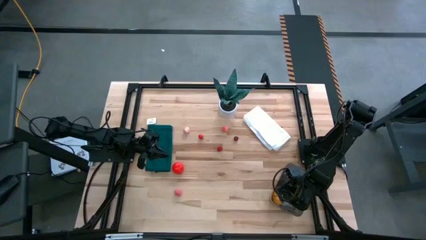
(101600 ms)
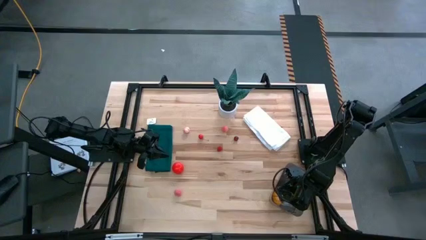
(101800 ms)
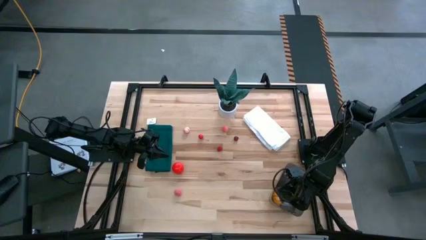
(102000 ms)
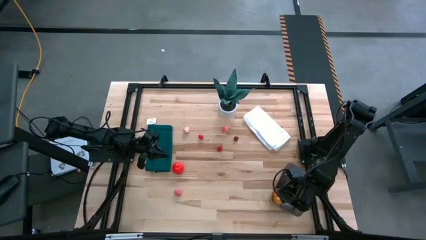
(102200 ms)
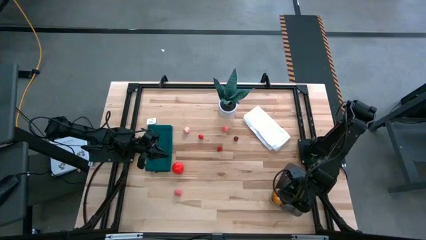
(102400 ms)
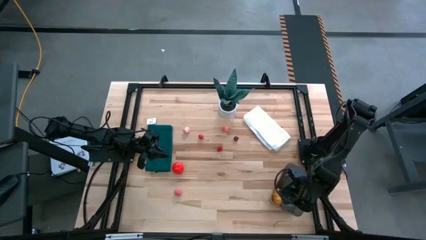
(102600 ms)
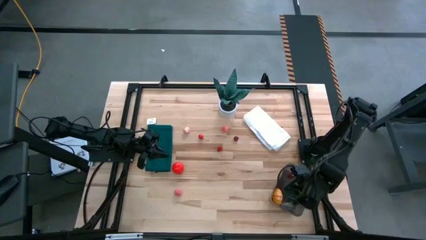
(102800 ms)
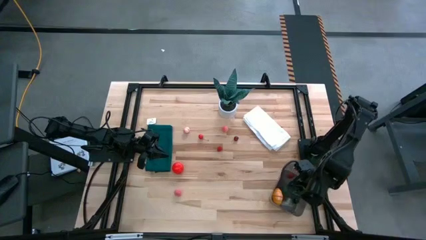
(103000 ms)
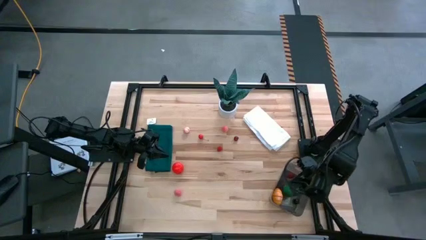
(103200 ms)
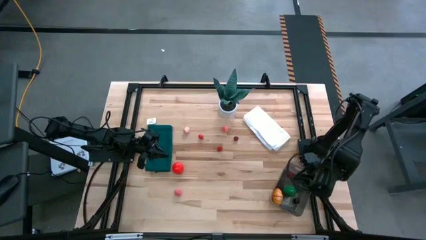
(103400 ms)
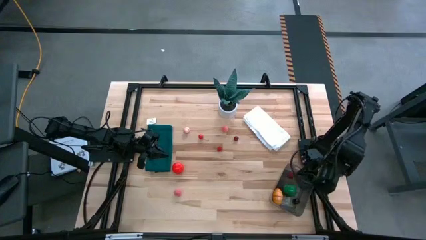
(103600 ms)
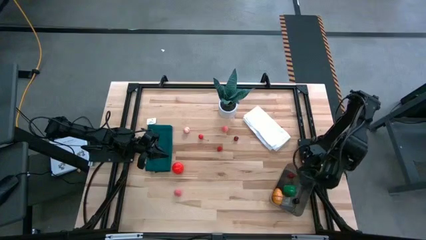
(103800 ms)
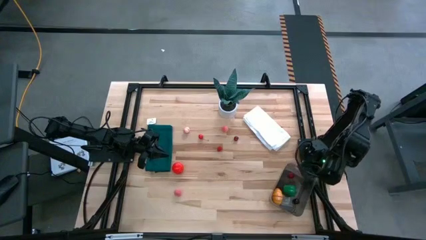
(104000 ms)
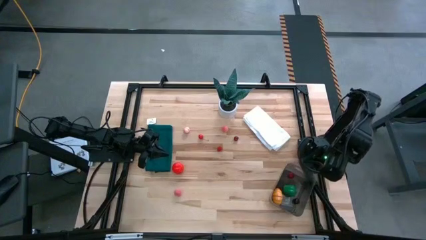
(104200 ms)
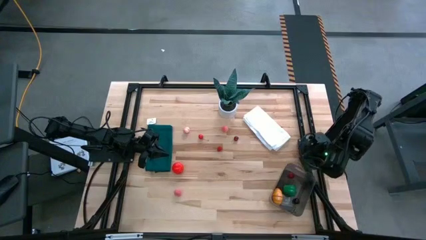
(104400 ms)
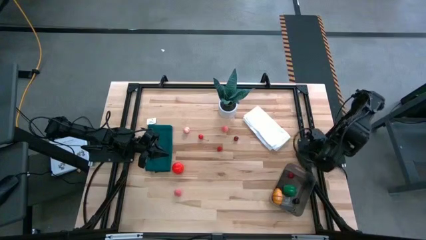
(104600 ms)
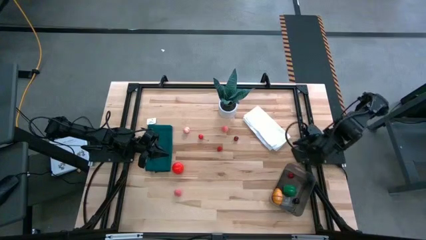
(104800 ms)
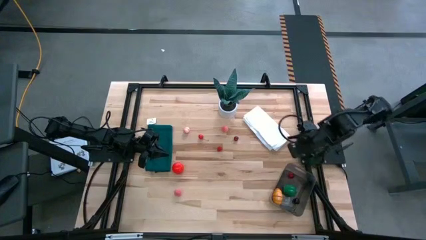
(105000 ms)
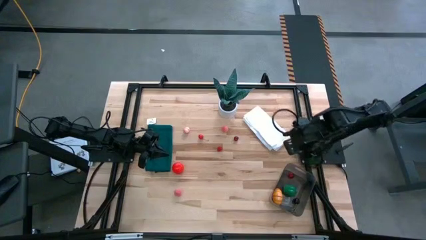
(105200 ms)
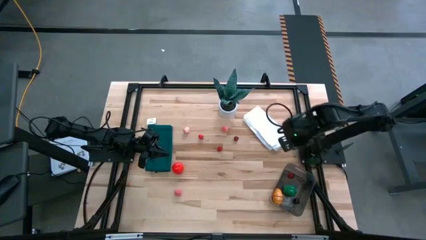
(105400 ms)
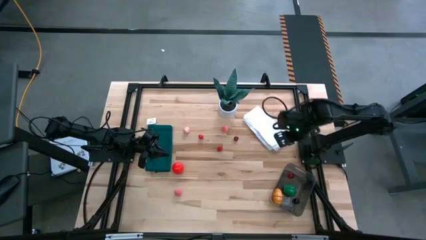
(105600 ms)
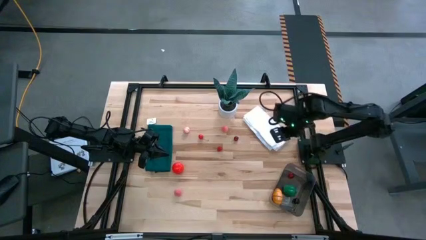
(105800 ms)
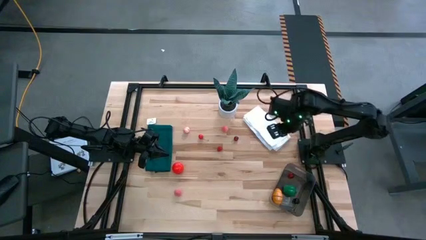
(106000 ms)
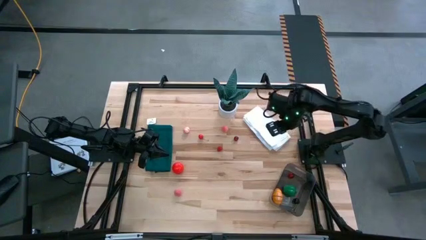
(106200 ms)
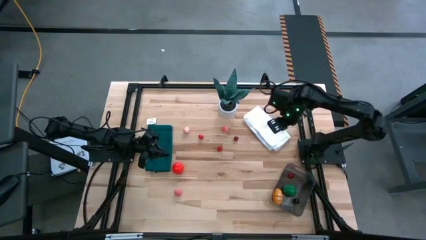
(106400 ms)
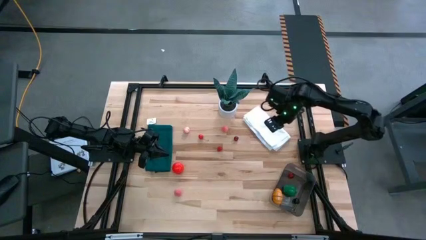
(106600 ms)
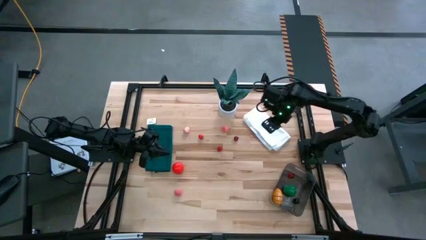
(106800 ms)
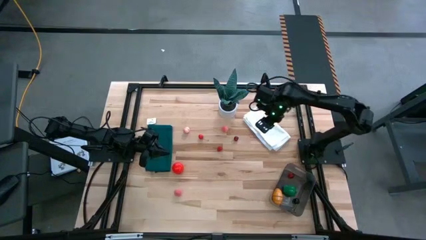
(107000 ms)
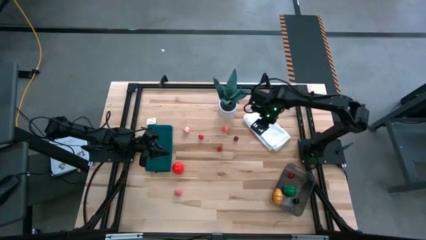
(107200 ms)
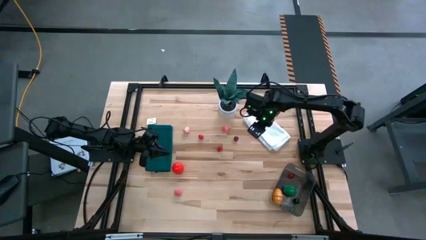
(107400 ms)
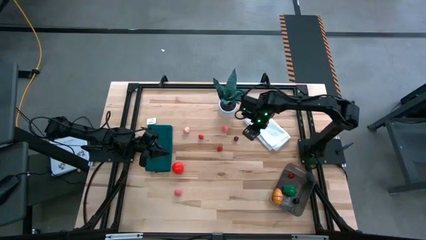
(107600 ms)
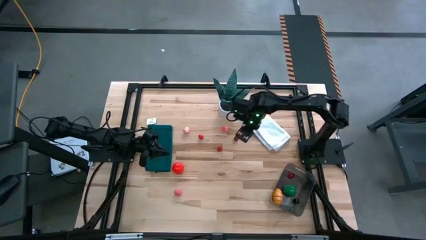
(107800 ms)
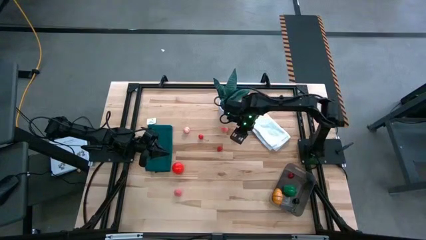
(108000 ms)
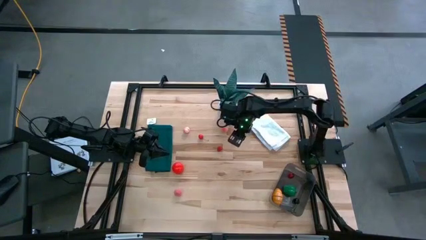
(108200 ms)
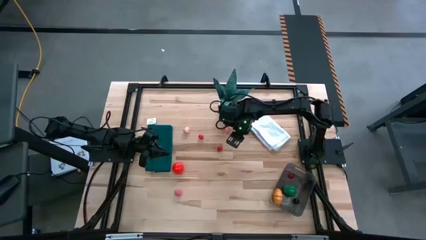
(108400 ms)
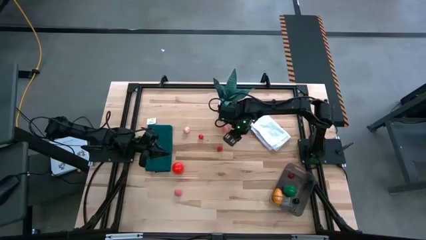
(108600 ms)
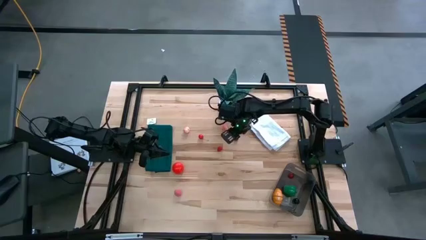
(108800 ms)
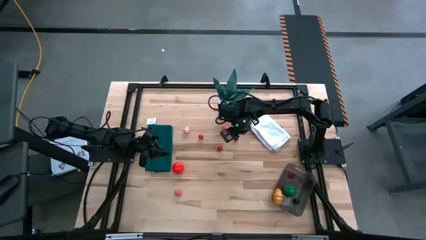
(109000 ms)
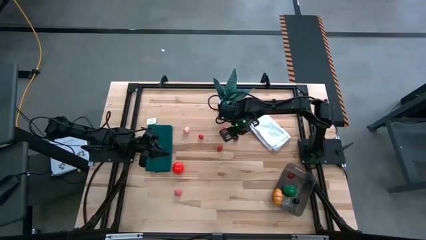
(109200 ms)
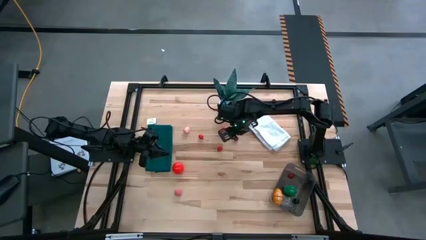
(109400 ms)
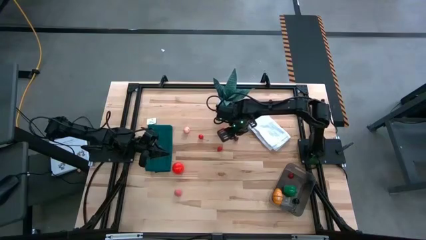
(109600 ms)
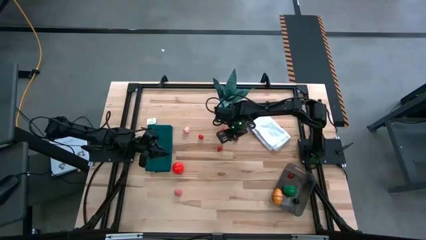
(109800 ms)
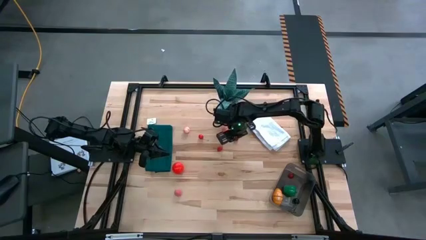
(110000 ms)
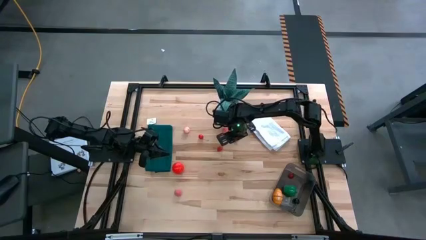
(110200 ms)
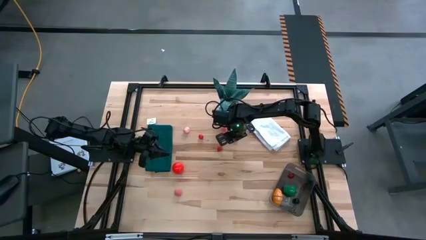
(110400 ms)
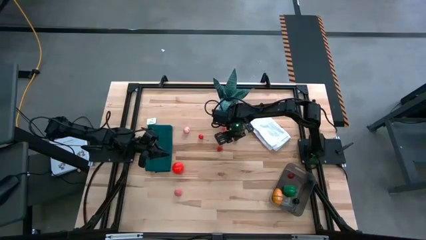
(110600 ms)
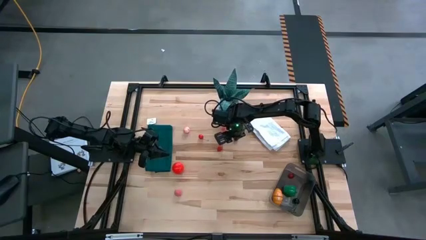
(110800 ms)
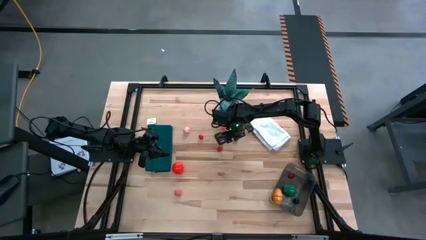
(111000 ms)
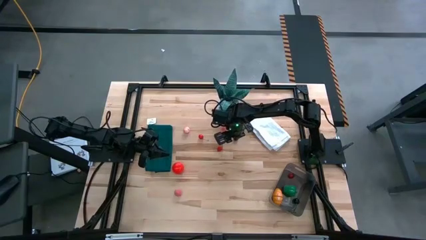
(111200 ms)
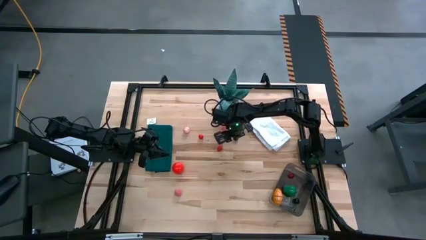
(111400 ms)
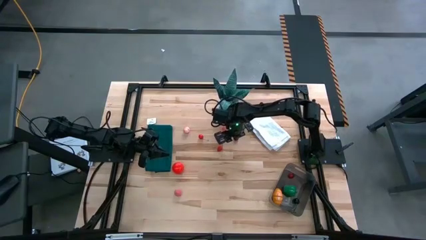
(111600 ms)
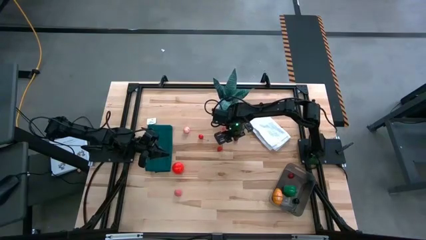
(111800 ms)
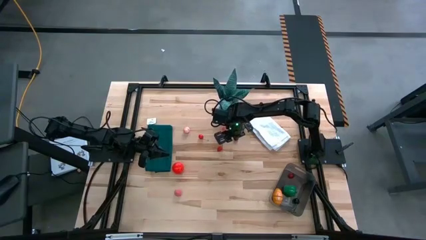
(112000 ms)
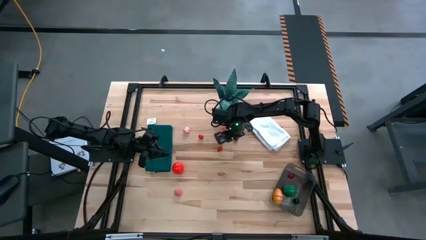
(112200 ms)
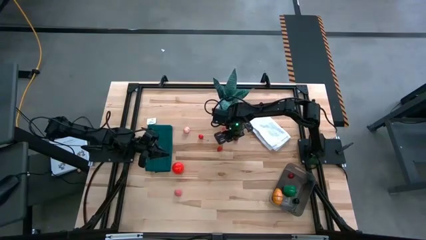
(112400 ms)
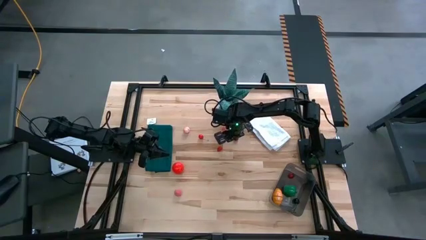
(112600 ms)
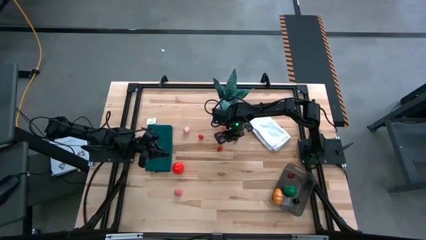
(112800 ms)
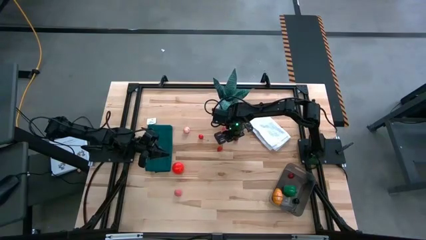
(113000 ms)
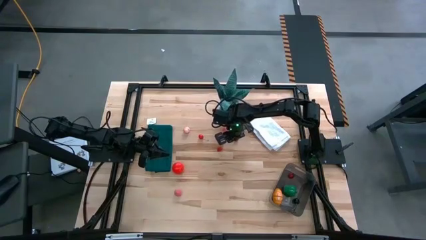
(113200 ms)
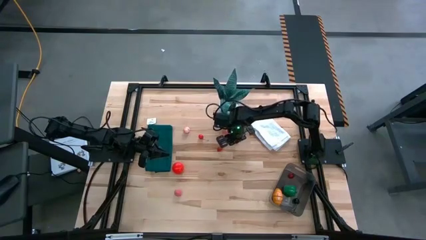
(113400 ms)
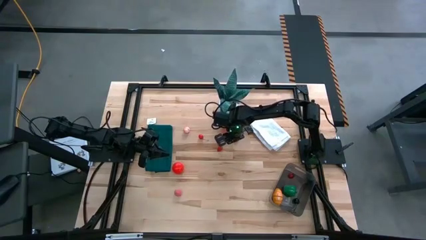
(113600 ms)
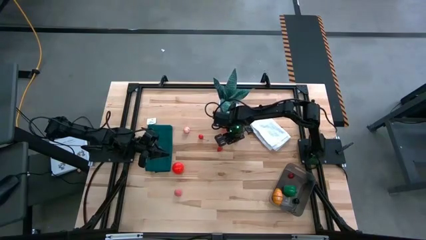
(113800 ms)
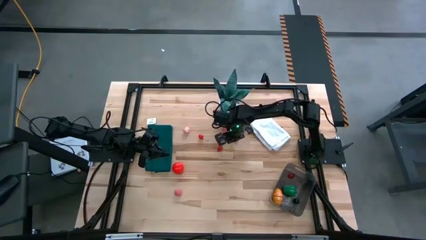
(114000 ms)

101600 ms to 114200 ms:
Task: Pick and placing Produce into tupperware
Put the right red cherry into the black bin

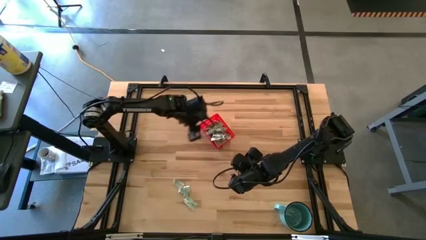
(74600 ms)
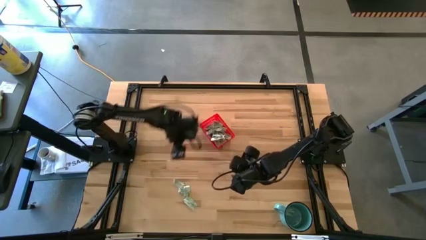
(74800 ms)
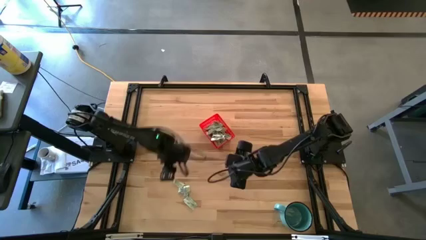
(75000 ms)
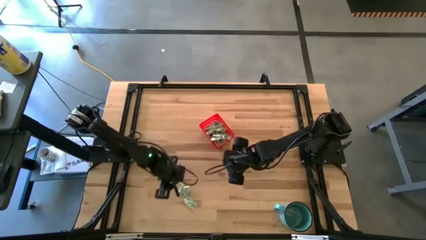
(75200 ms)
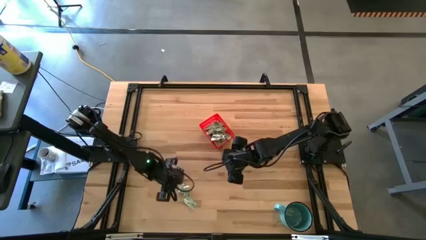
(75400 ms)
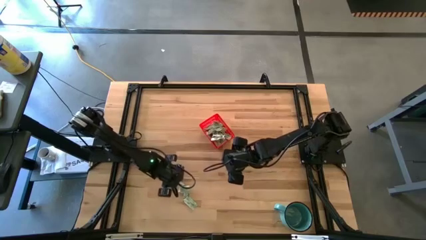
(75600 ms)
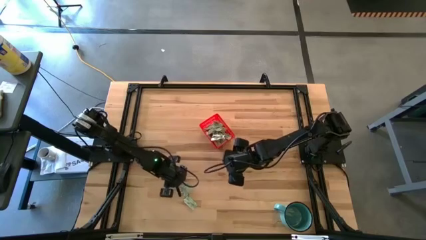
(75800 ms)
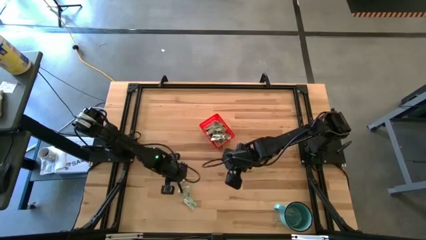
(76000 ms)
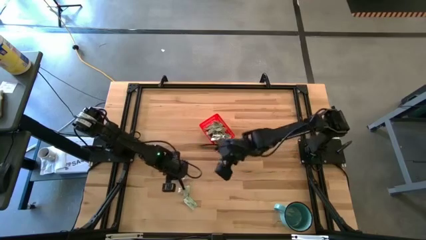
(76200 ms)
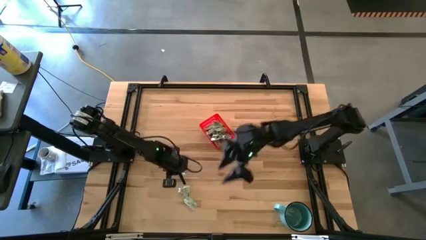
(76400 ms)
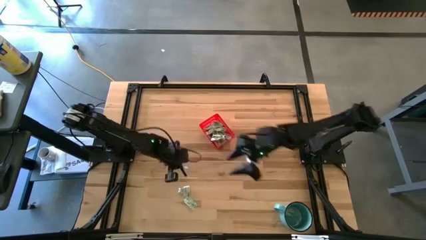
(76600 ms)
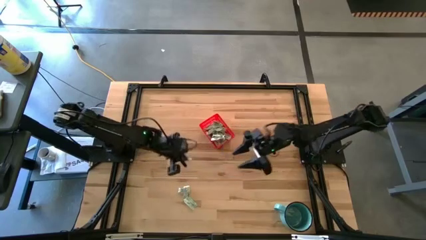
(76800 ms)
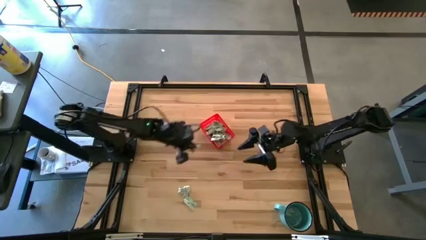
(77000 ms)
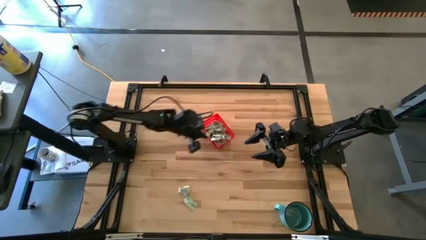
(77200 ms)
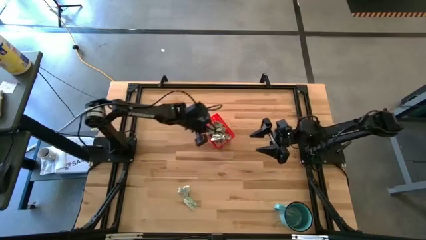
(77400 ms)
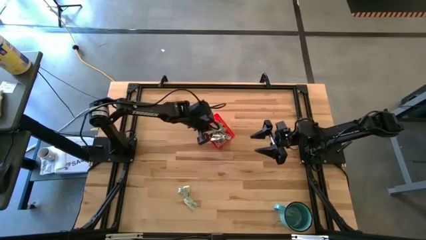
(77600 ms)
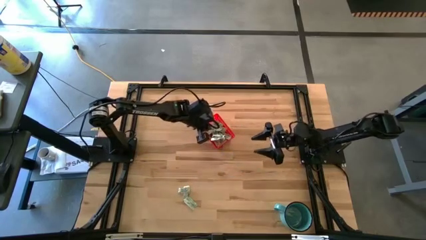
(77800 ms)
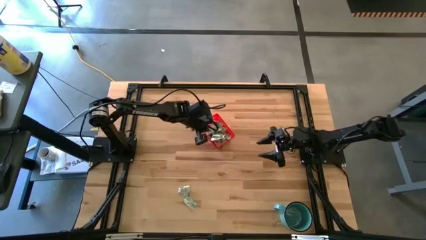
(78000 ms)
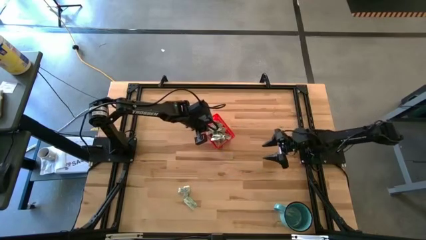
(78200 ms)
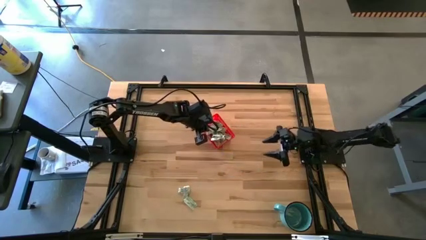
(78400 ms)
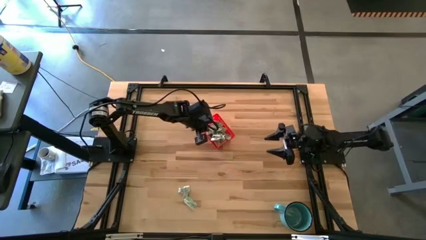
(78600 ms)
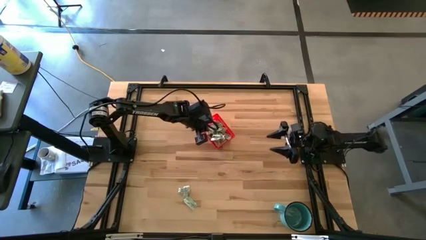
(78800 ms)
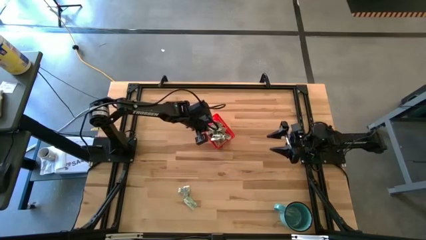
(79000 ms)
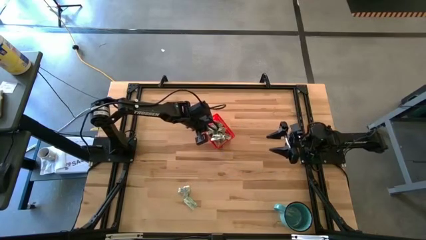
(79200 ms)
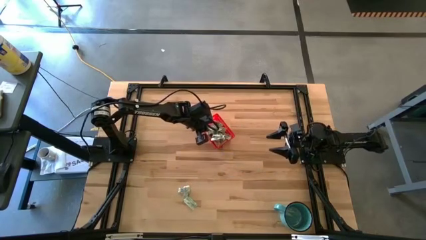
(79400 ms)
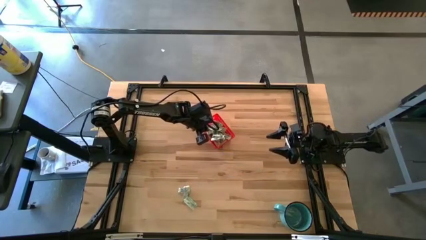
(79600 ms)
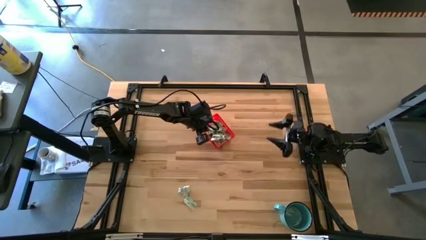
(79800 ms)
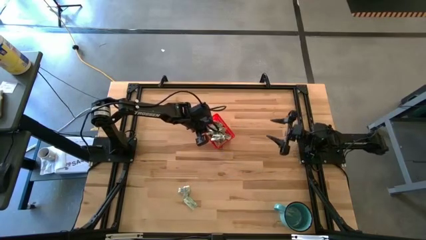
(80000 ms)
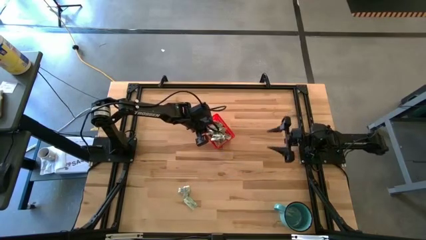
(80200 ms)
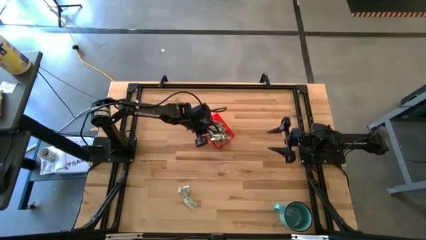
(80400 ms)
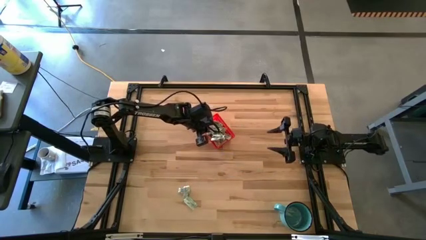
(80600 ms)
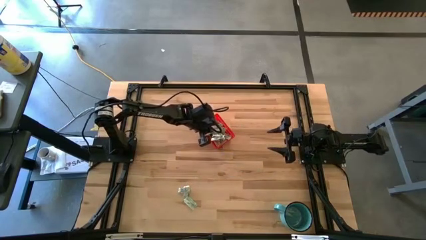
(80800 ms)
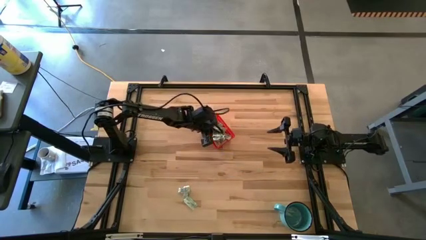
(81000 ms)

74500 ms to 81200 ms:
Task: Pick and place Stevia / Truvia into bins
Put the stevia packet into the red basket
